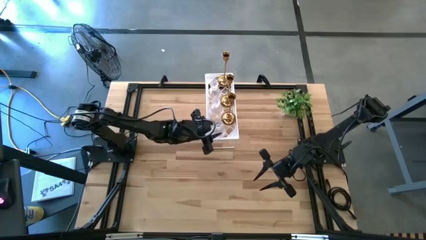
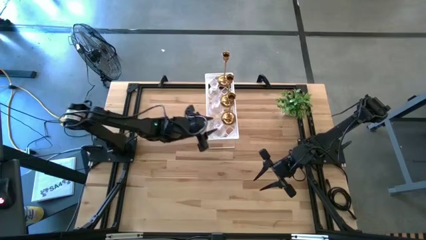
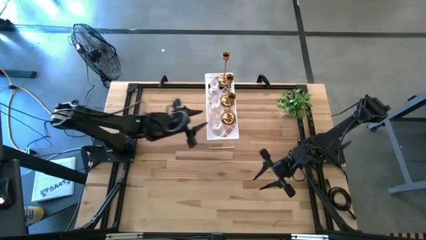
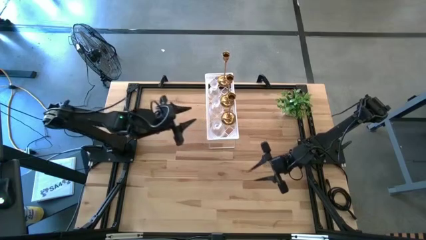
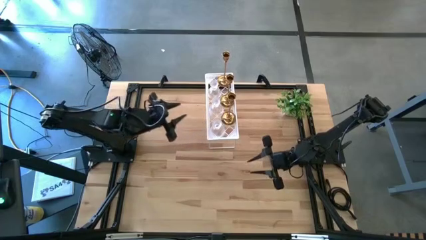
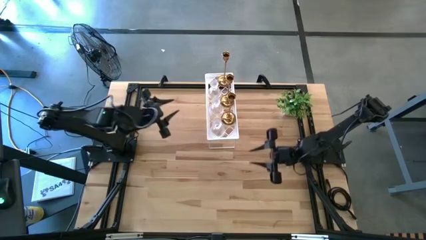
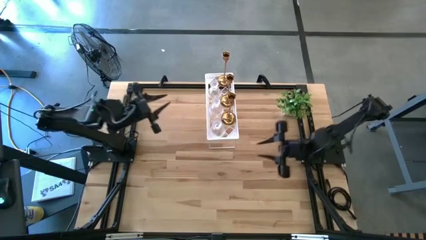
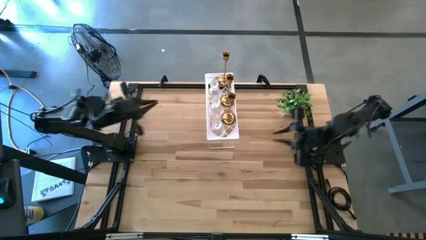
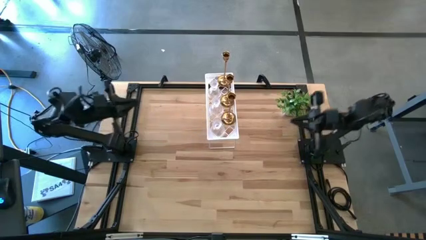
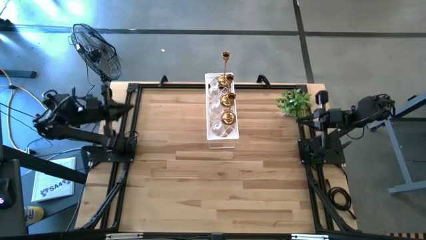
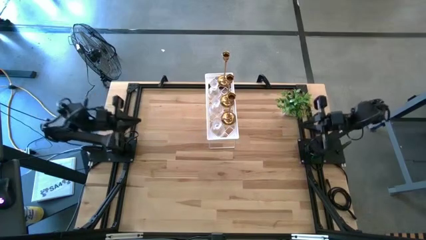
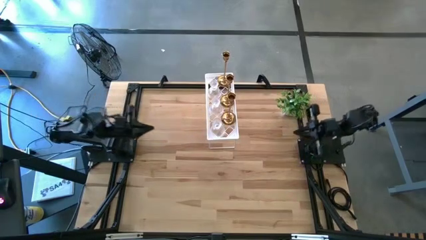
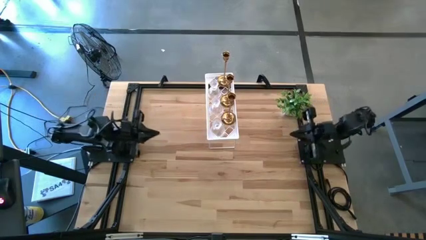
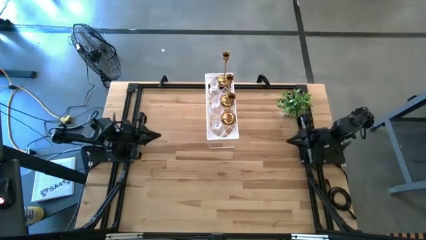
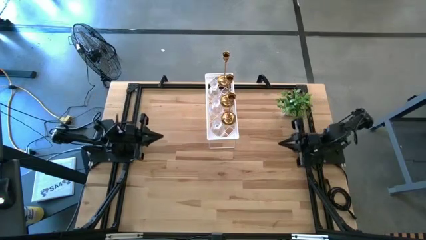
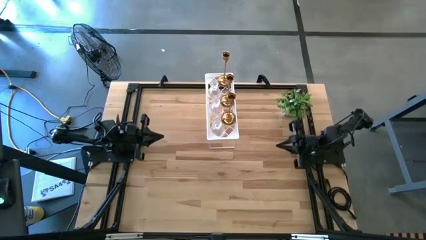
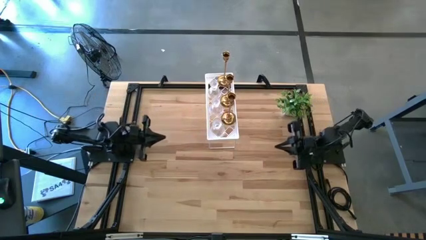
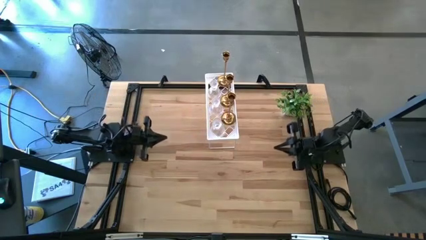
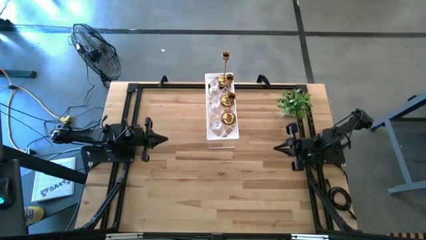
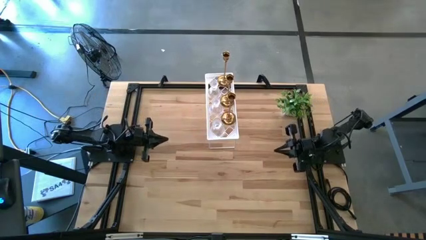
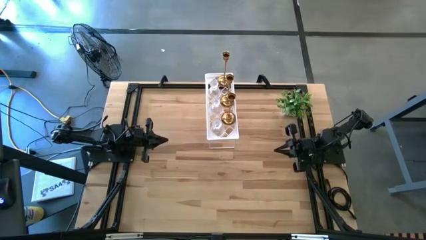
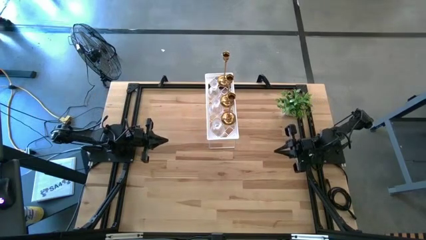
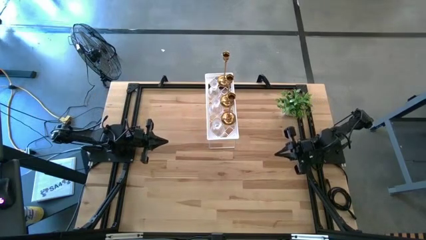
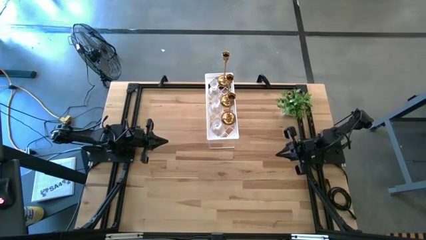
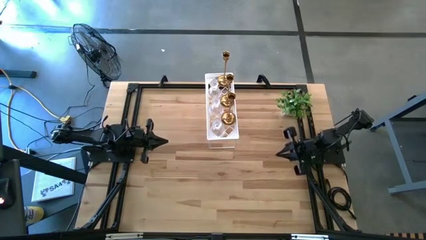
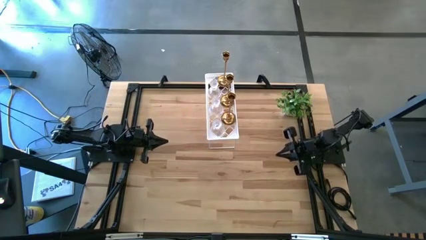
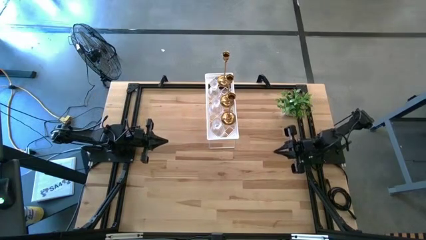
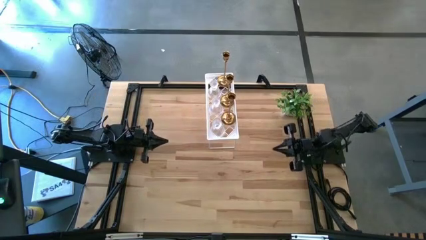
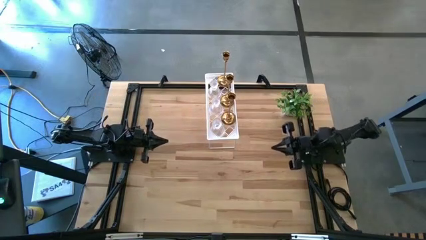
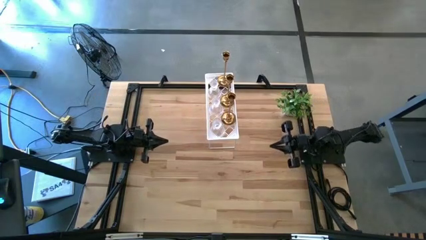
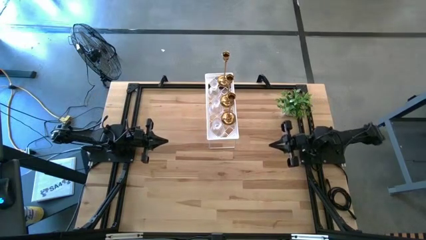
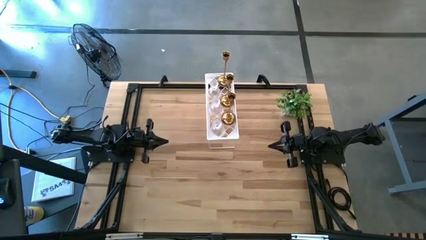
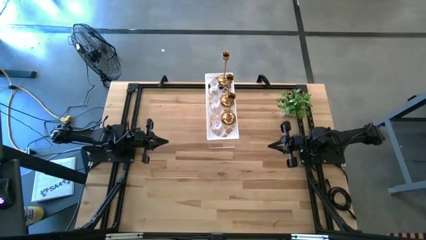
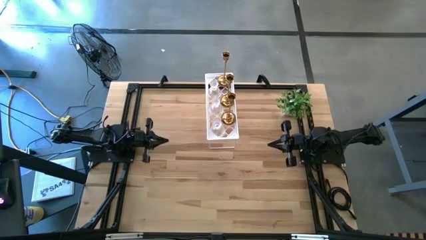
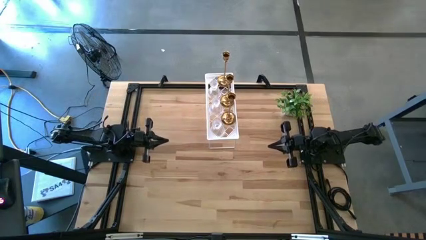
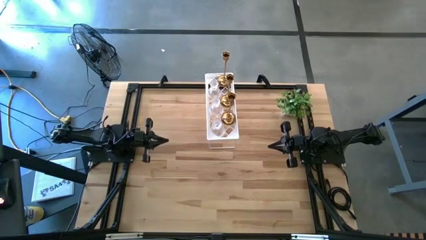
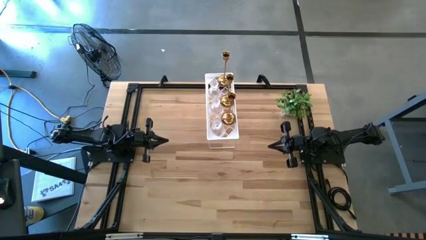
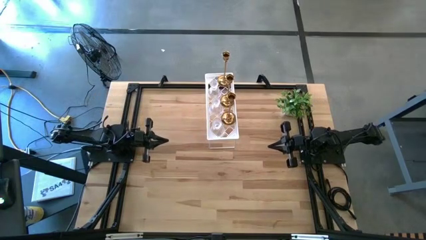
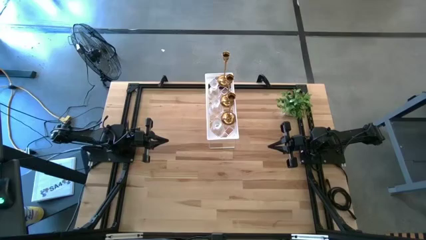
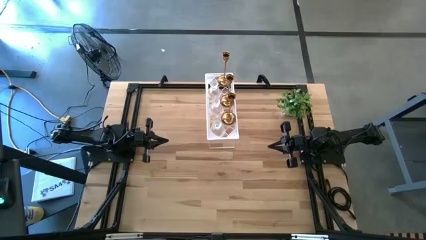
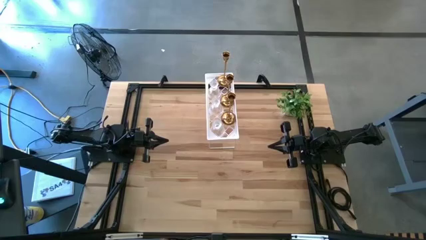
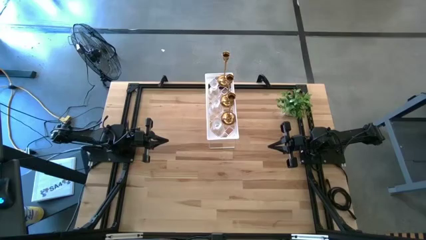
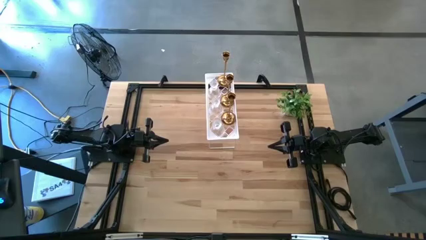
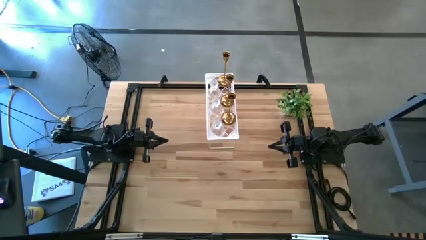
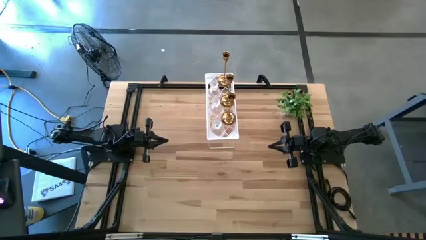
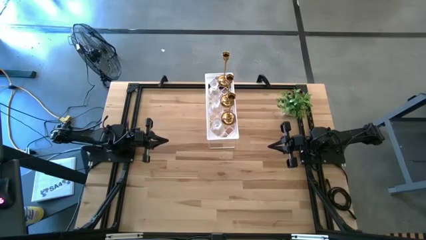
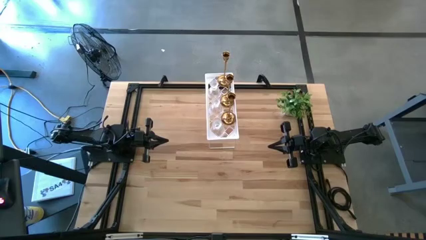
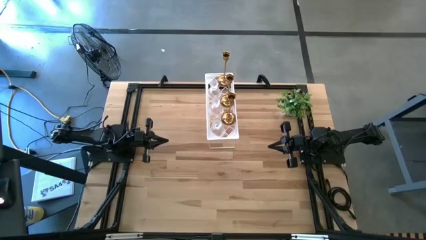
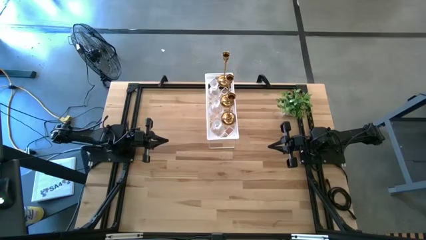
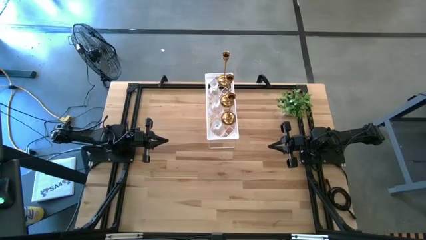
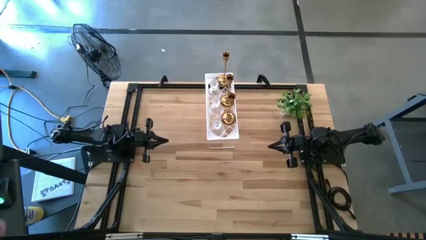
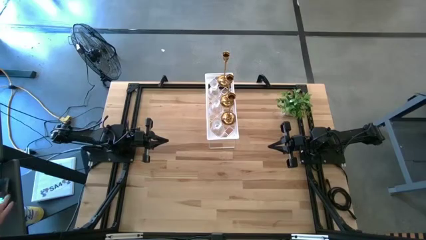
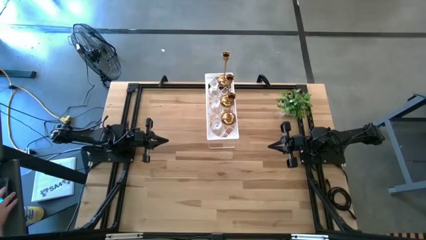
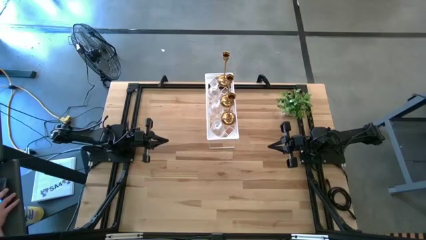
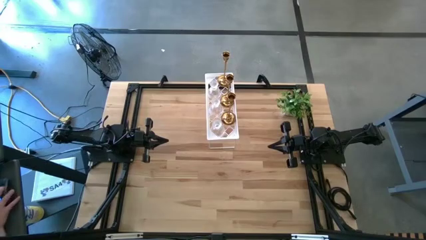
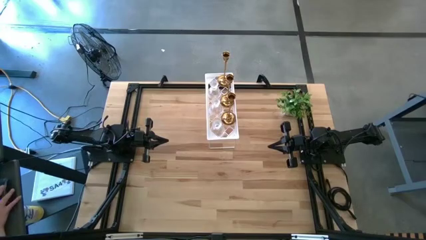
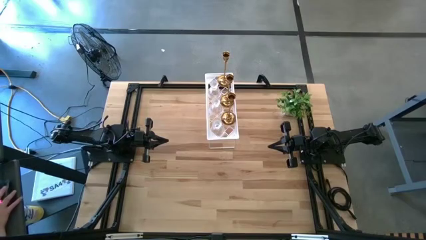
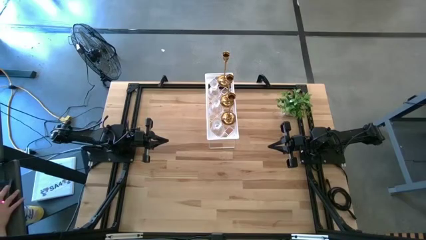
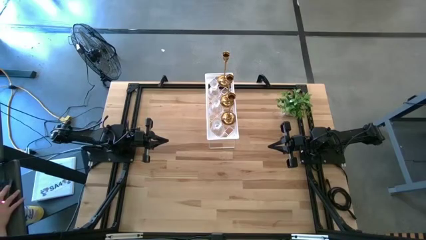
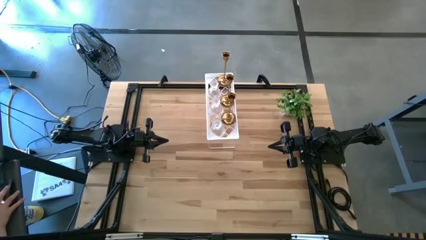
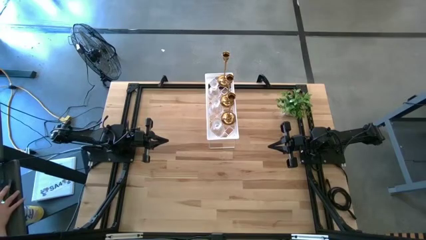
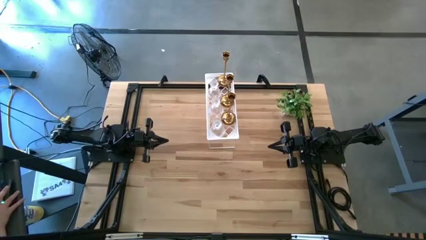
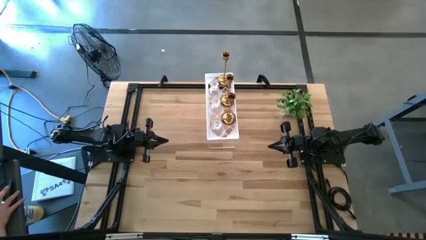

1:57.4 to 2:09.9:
Task: Pick & Place candle stick holders
Return to Home Position
